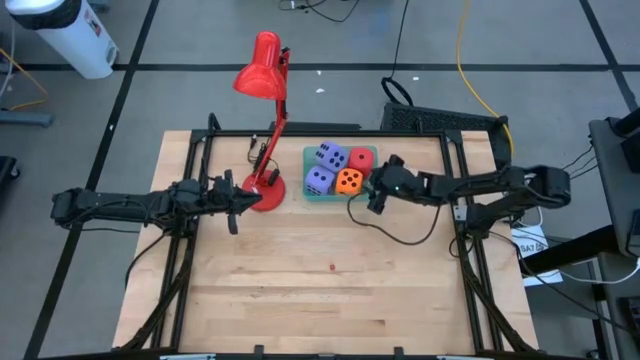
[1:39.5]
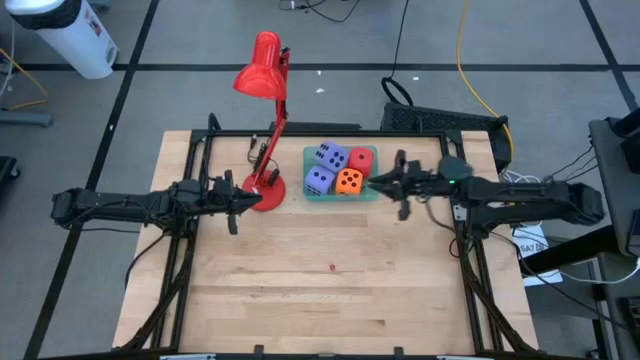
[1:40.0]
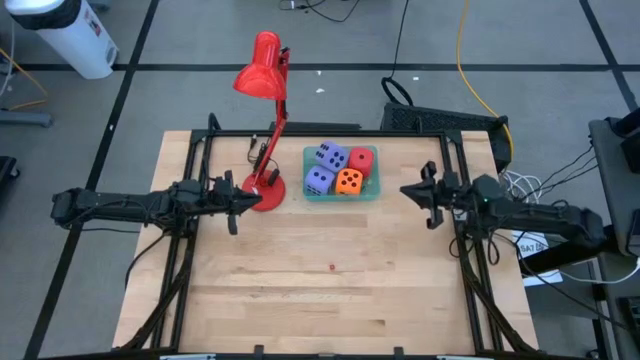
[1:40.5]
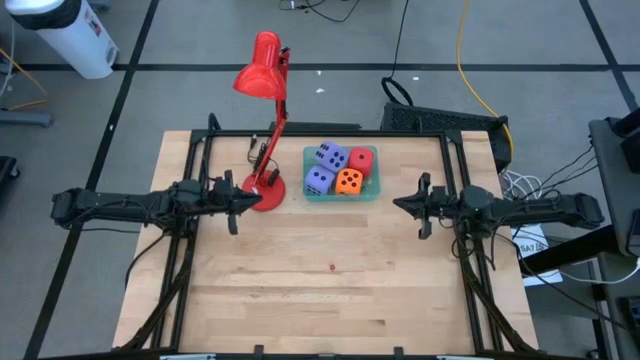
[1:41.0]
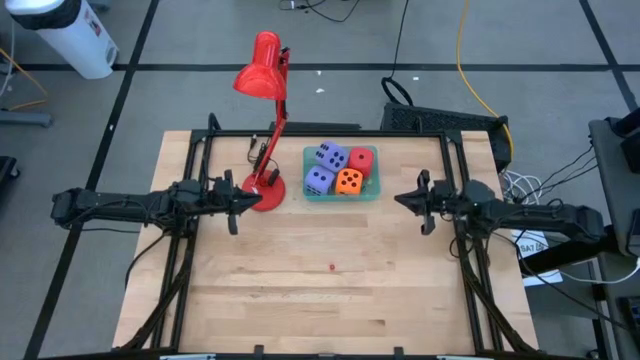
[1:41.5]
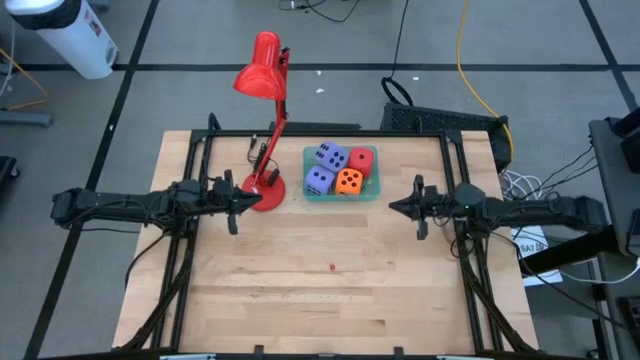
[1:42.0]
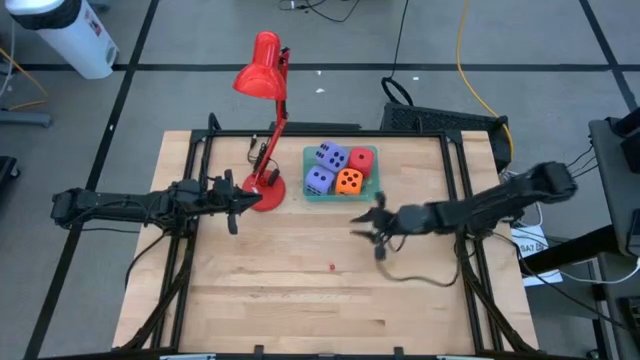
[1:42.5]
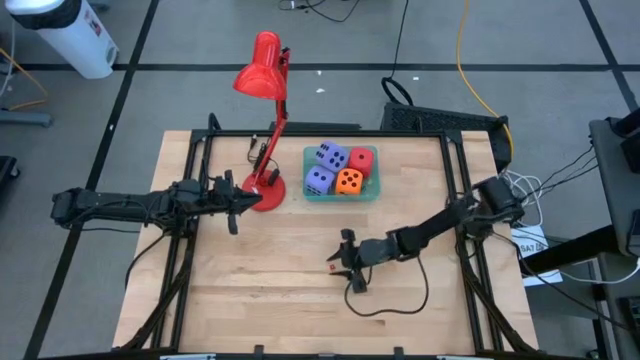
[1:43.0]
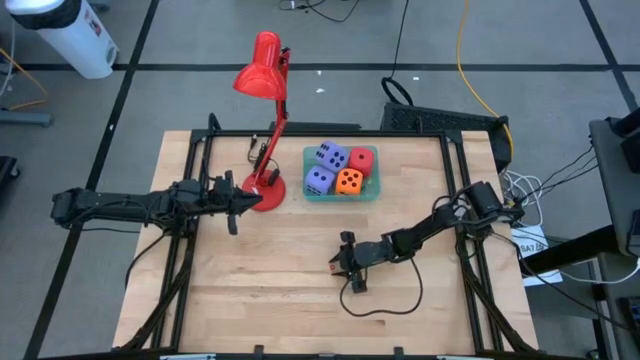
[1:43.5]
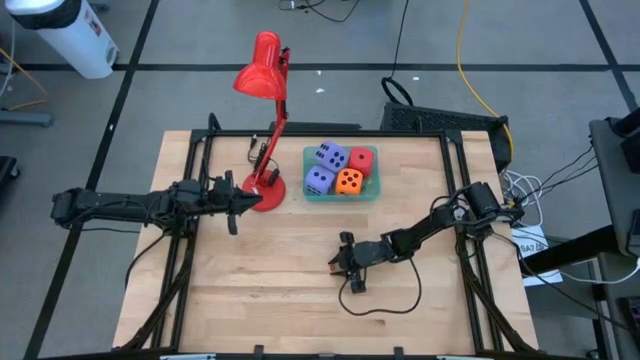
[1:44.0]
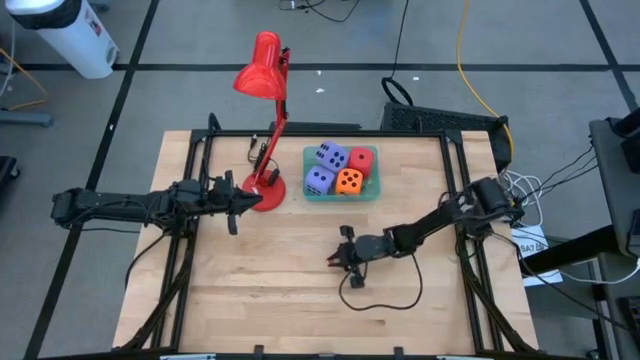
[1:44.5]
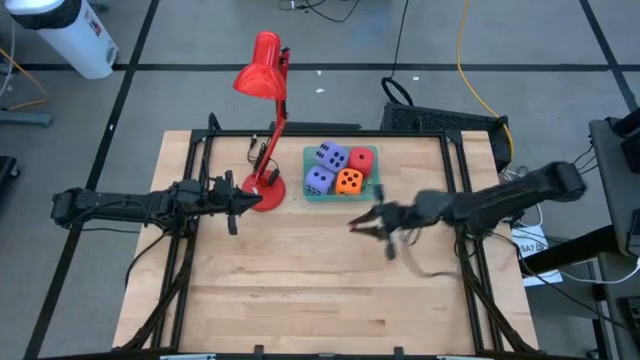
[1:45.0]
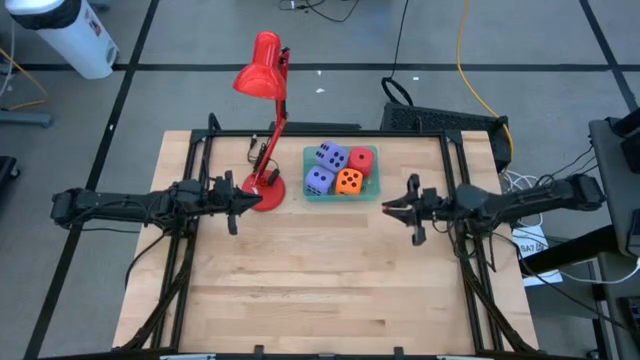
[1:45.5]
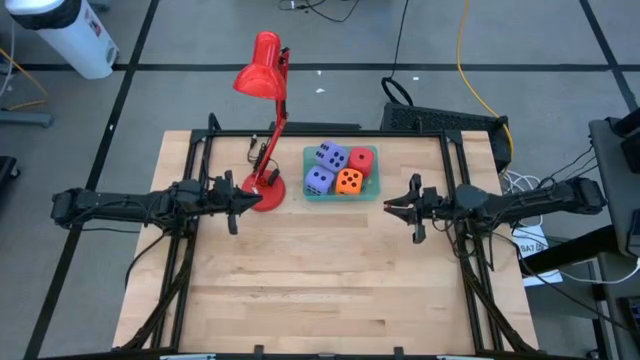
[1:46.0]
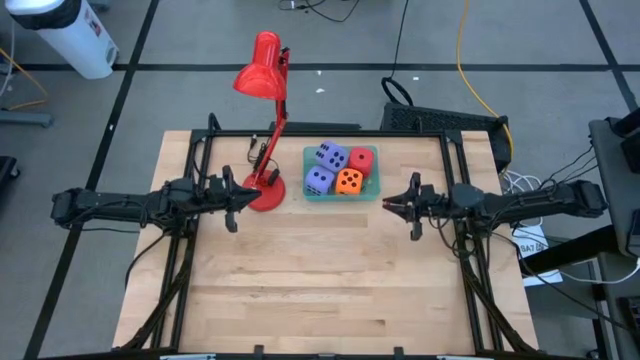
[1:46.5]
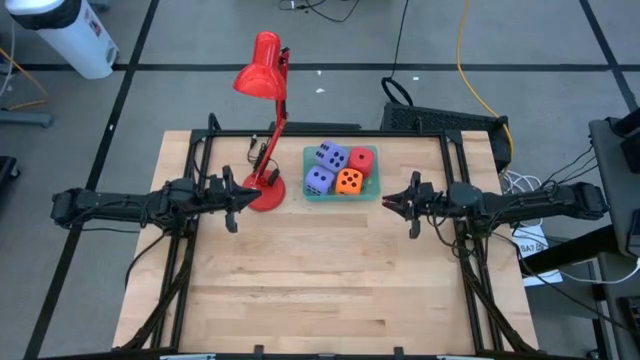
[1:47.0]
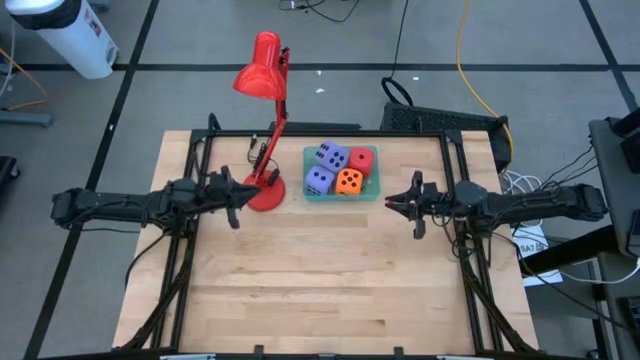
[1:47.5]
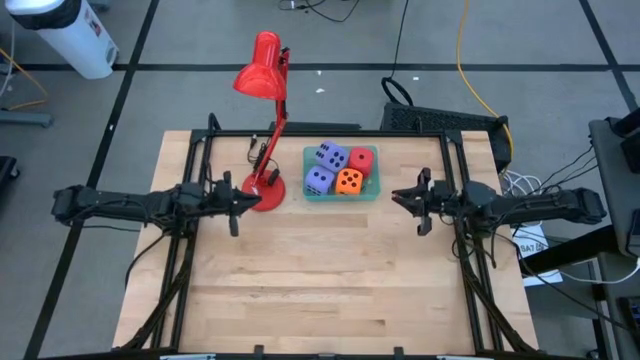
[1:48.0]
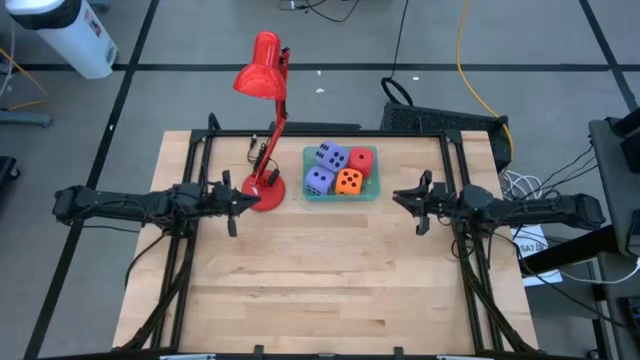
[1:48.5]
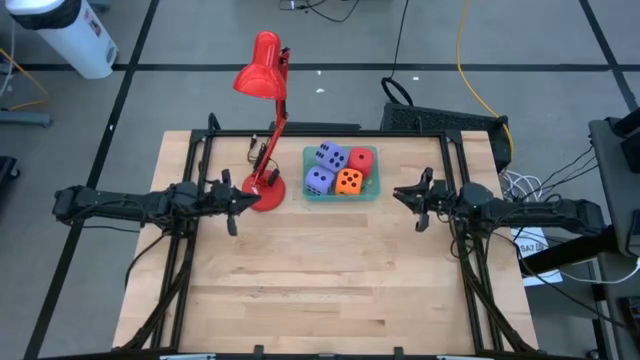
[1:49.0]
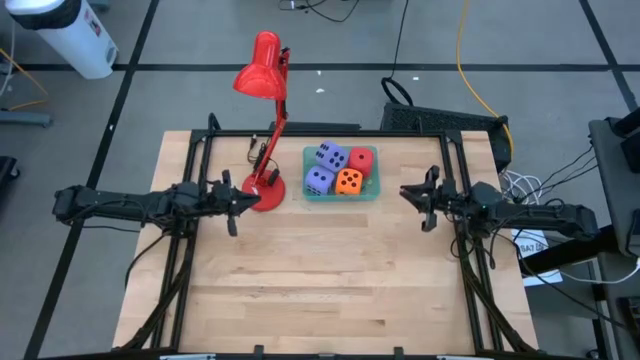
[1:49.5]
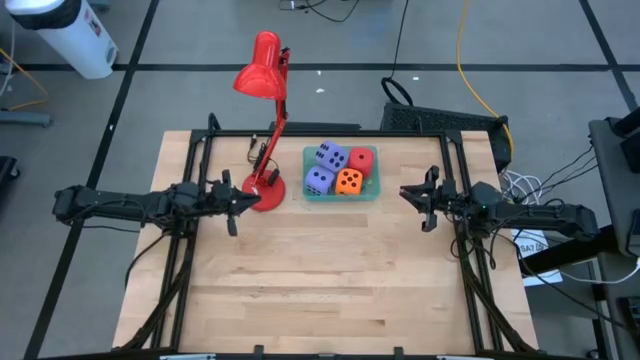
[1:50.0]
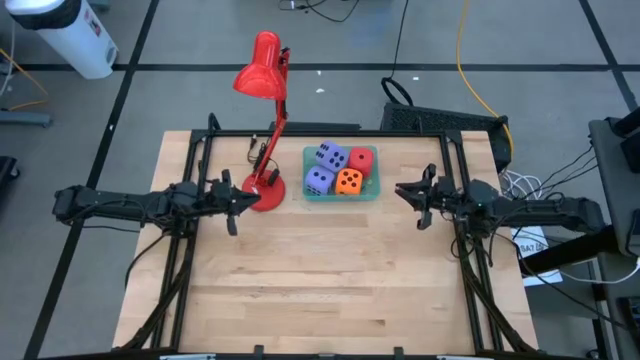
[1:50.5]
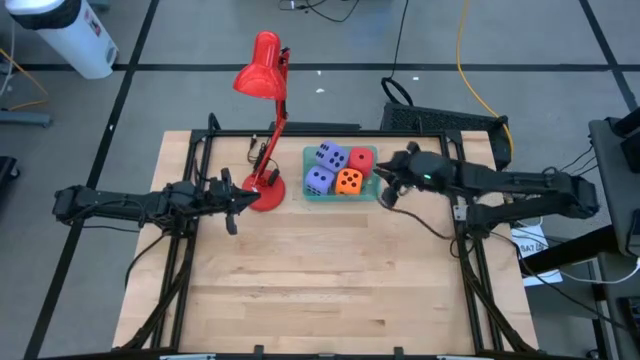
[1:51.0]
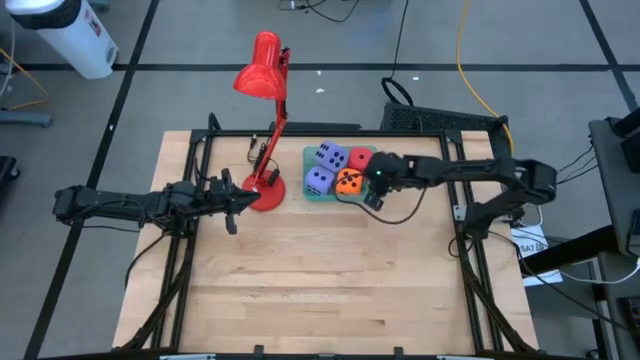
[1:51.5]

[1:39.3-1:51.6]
Task: Pick & Place Dice
Put the red small die into the green bin

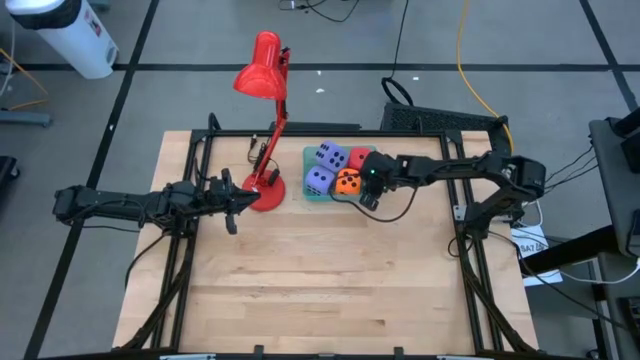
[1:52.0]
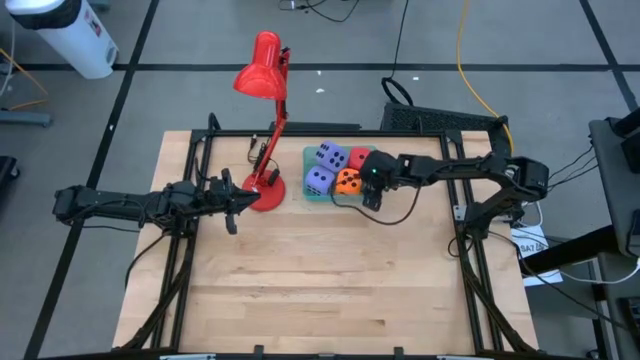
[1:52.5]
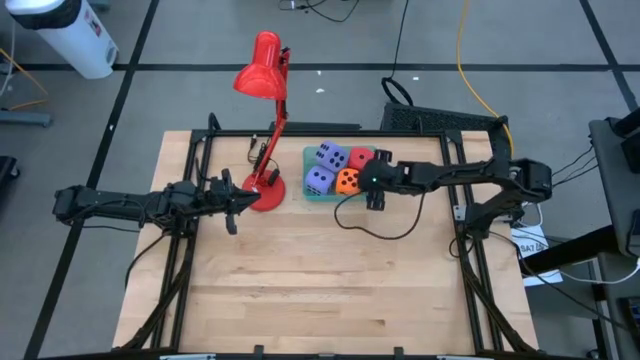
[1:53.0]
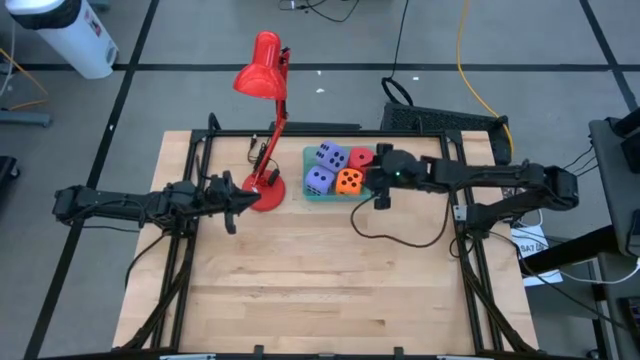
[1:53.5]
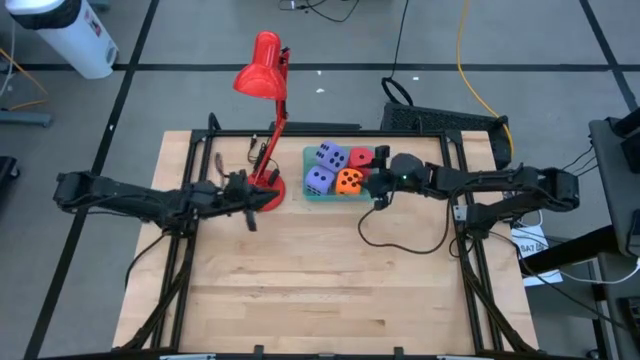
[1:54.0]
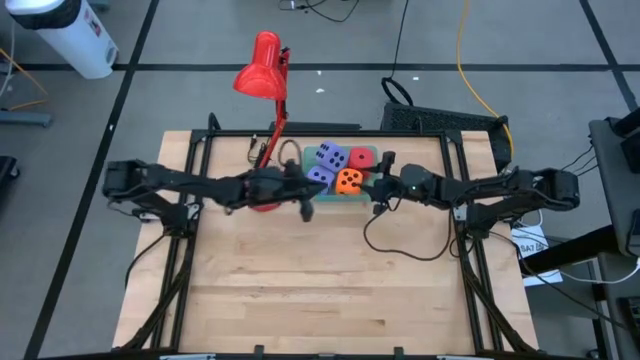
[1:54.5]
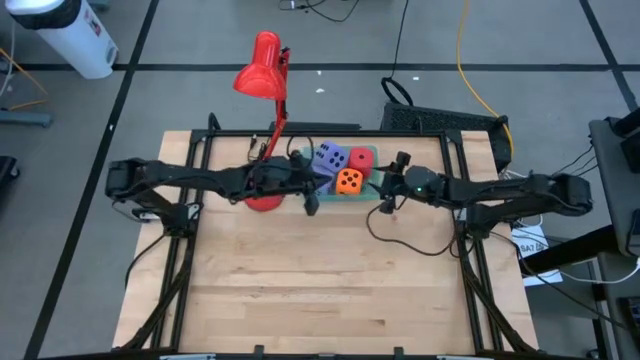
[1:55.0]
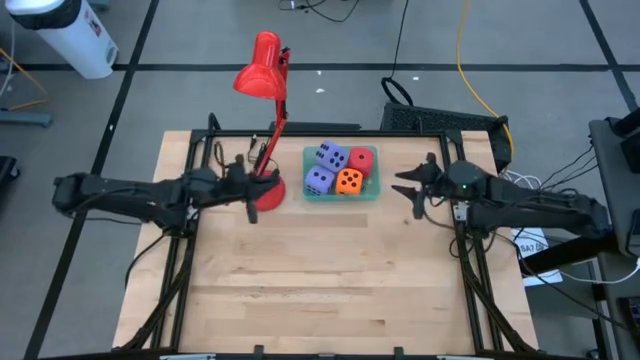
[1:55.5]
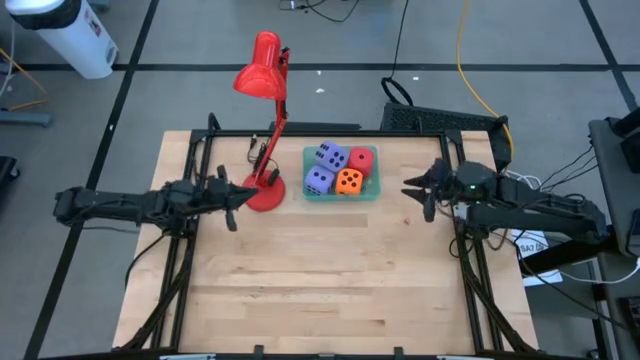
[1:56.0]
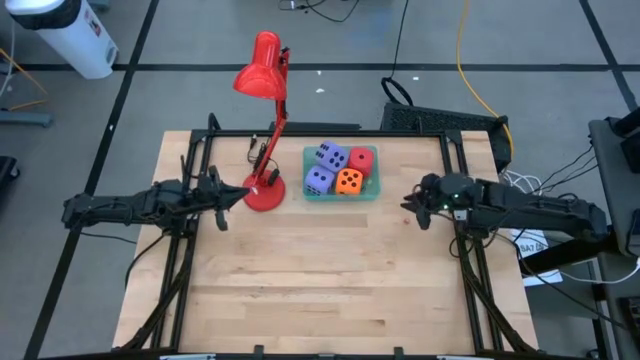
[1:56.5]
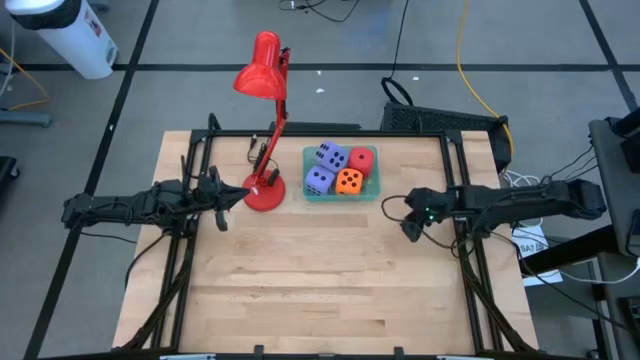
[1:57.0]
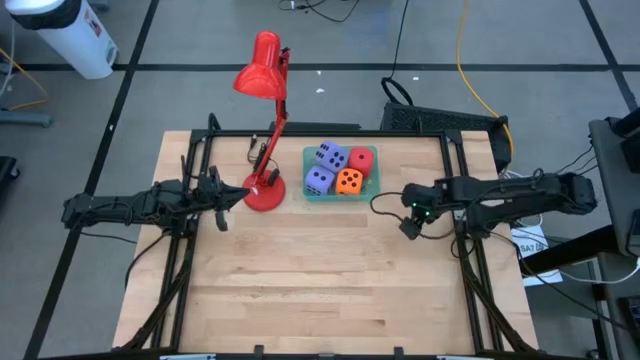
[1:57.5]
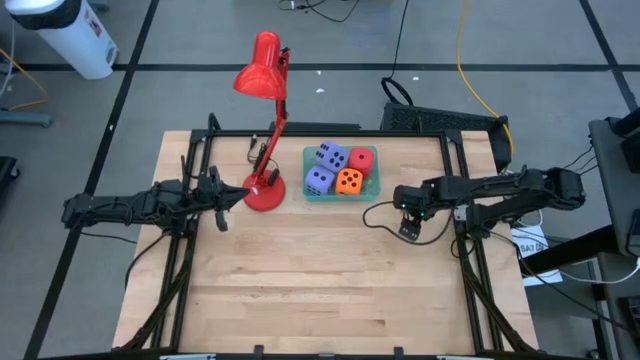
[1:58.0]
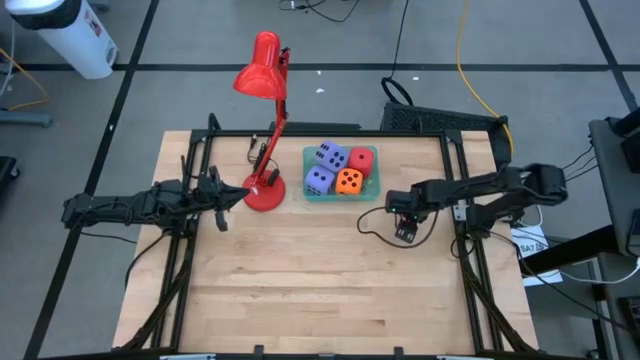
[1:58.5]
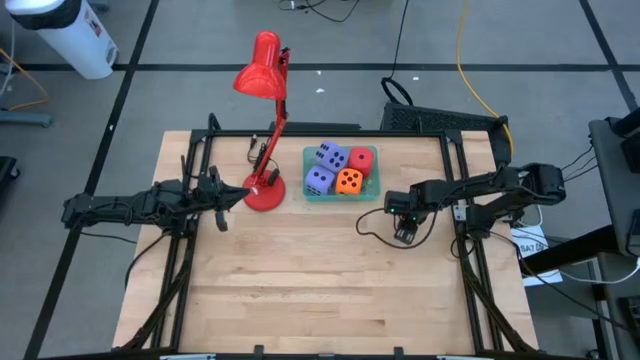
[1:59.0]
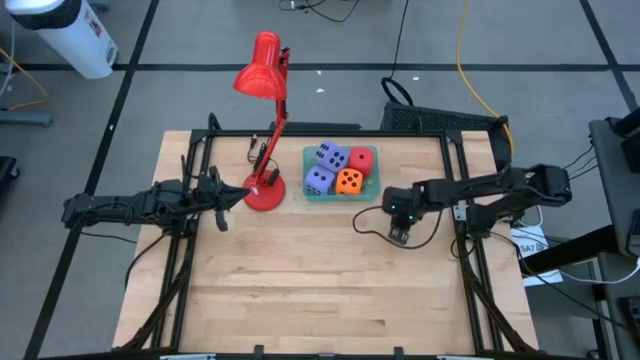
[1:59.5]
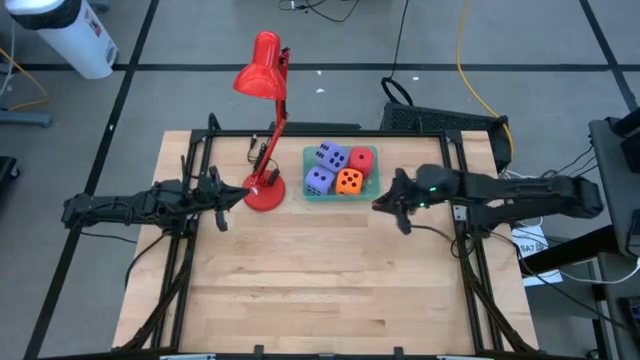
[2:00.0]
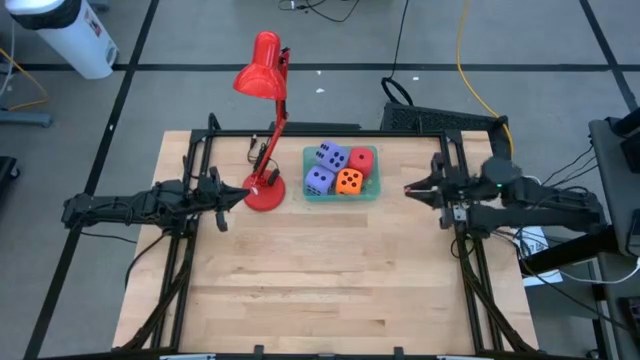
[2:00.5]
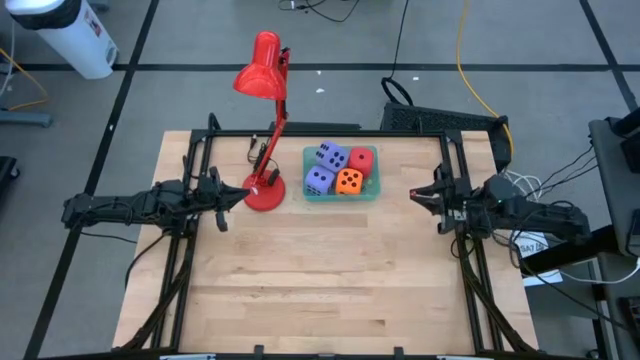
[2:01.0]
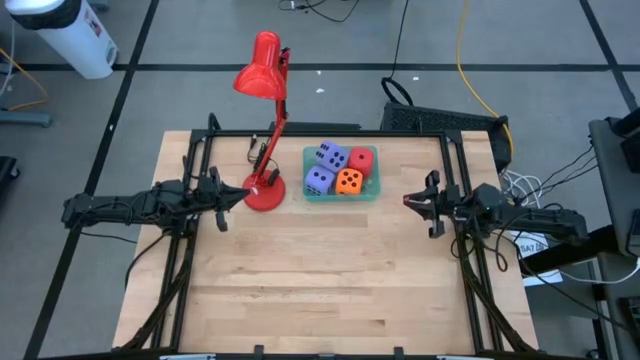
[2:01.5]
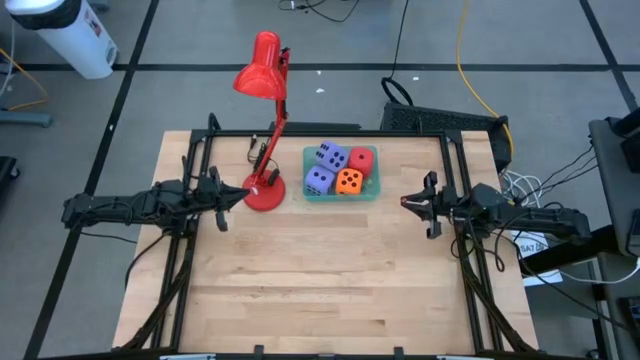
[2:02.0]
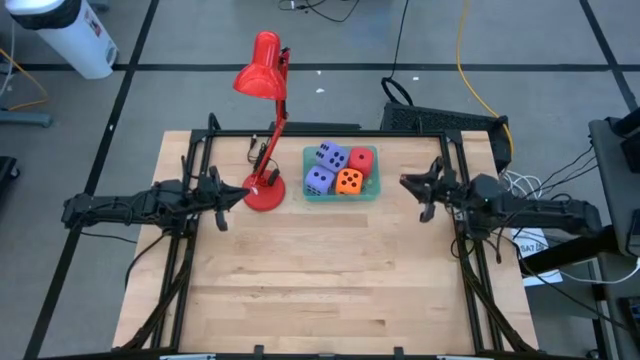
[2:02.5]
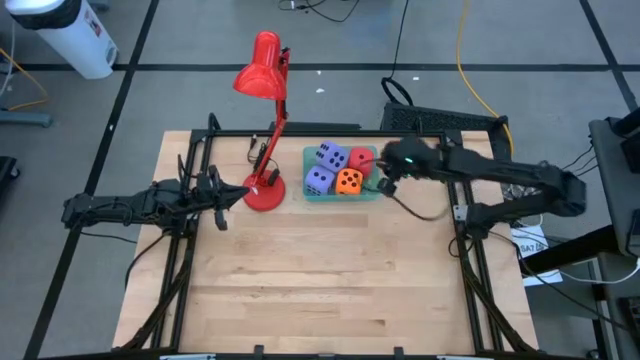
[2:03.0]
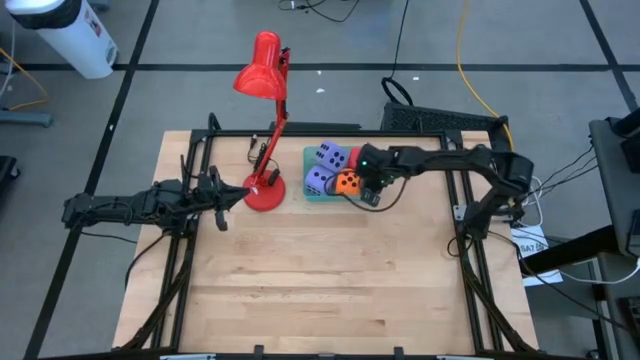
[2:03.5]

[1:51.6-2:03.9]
Put the red small die into the green bin
